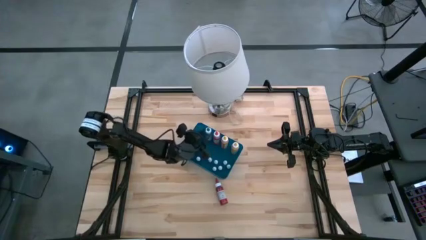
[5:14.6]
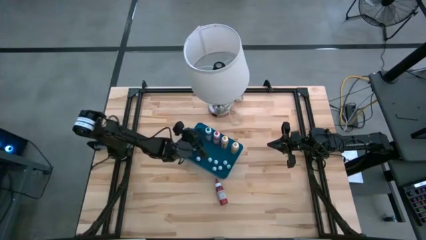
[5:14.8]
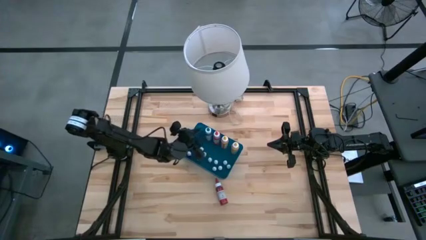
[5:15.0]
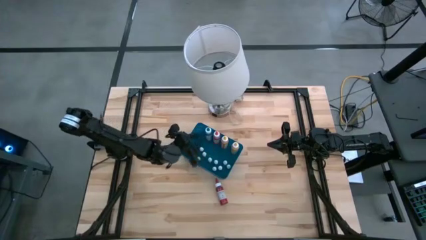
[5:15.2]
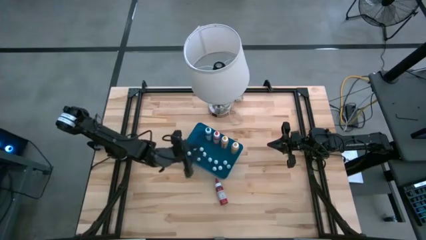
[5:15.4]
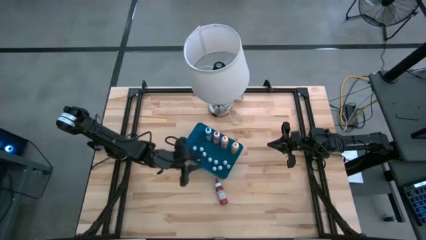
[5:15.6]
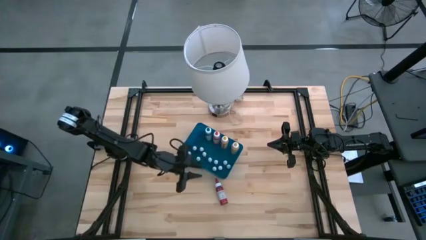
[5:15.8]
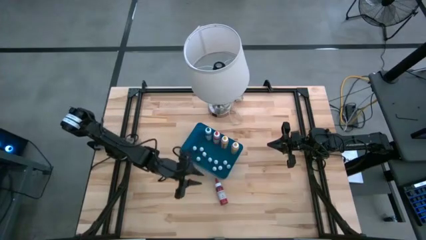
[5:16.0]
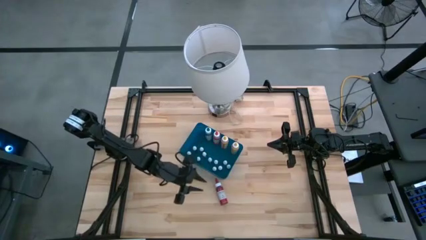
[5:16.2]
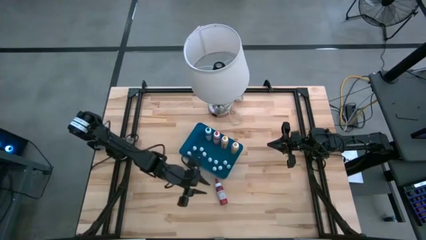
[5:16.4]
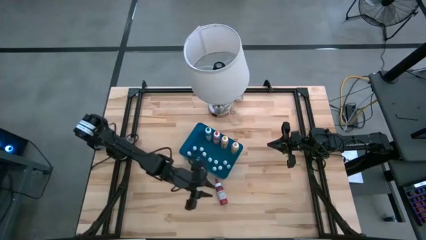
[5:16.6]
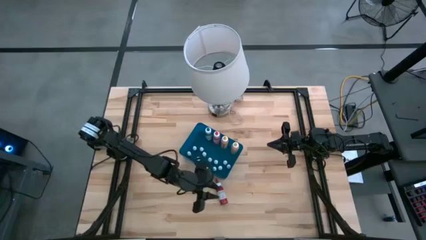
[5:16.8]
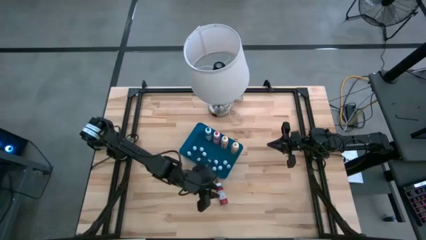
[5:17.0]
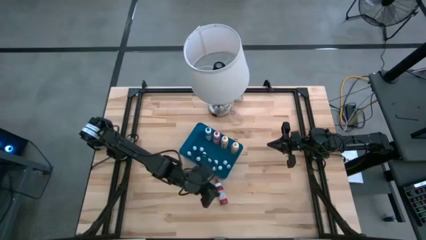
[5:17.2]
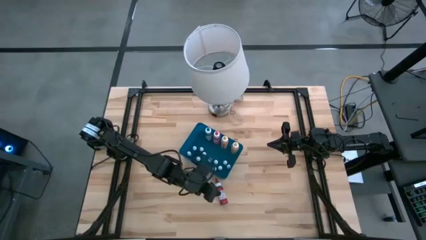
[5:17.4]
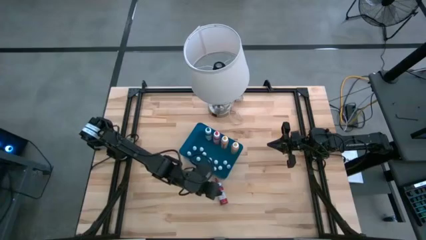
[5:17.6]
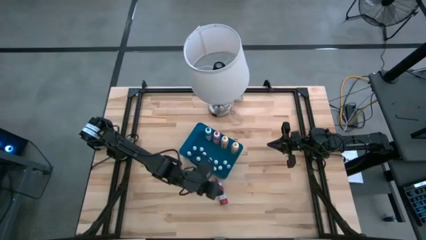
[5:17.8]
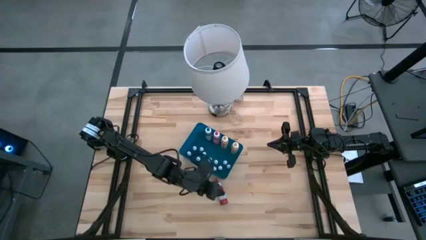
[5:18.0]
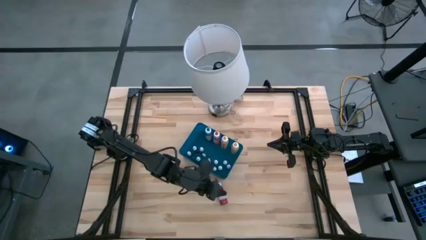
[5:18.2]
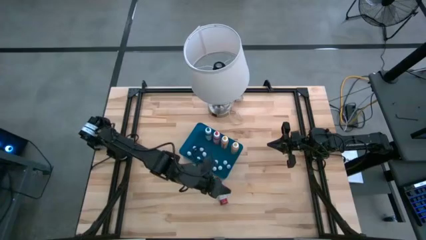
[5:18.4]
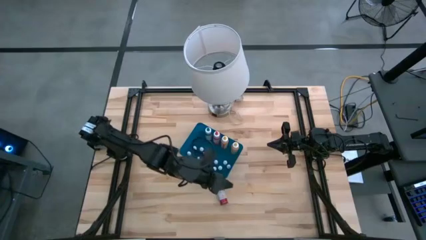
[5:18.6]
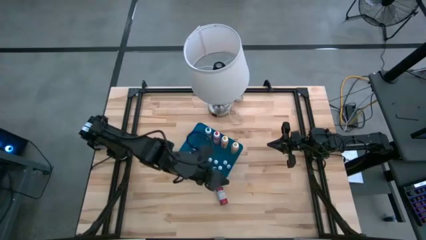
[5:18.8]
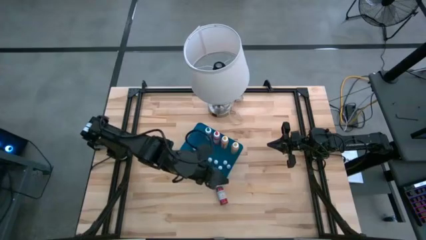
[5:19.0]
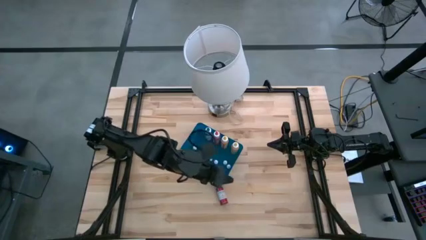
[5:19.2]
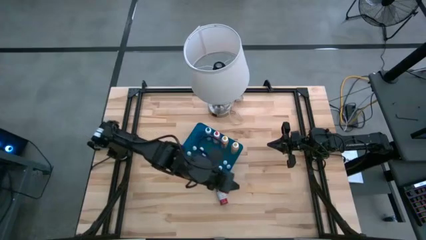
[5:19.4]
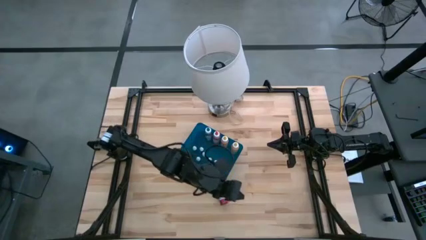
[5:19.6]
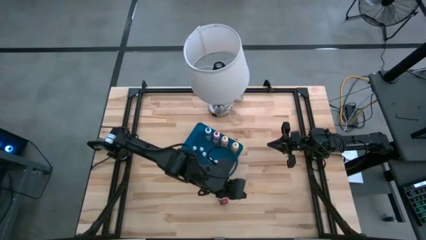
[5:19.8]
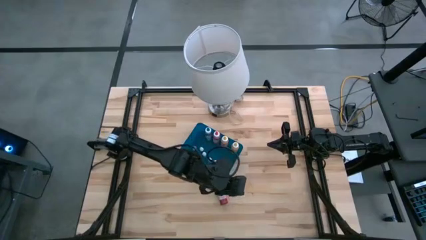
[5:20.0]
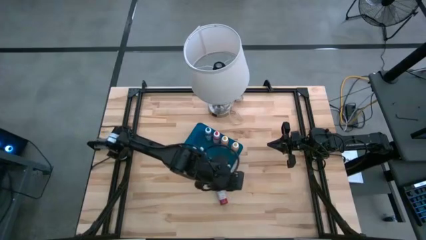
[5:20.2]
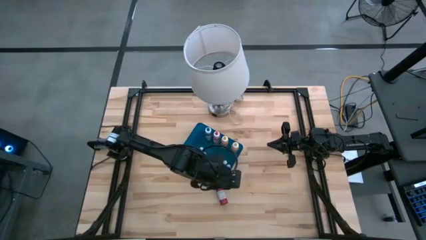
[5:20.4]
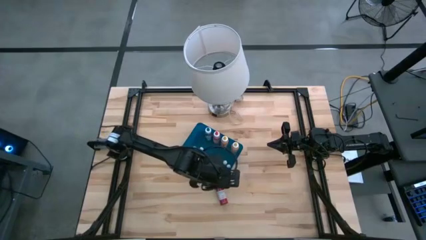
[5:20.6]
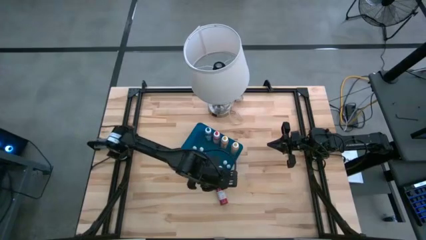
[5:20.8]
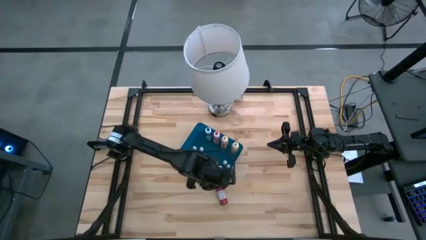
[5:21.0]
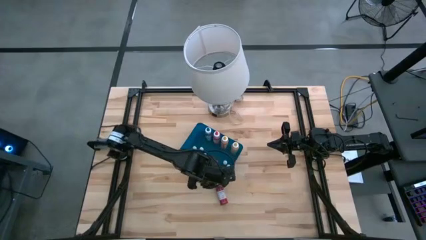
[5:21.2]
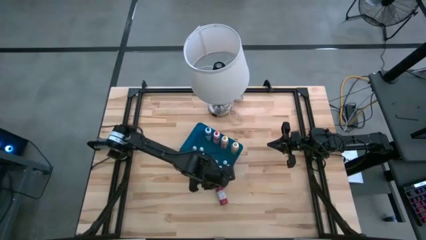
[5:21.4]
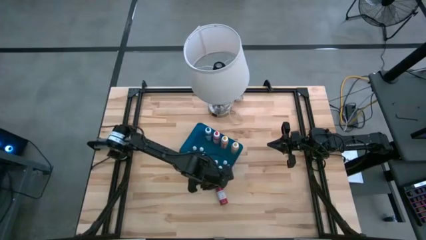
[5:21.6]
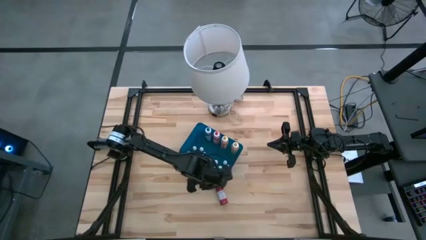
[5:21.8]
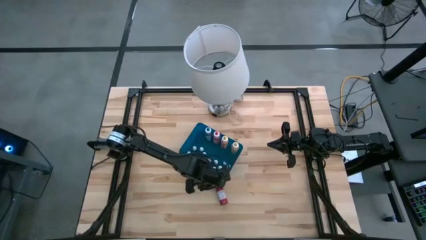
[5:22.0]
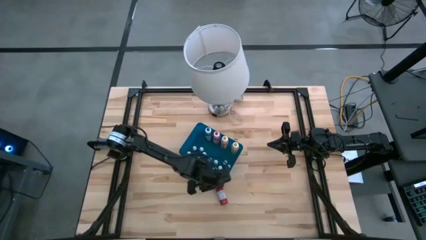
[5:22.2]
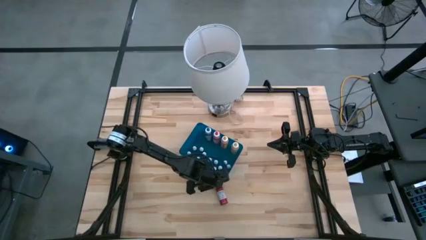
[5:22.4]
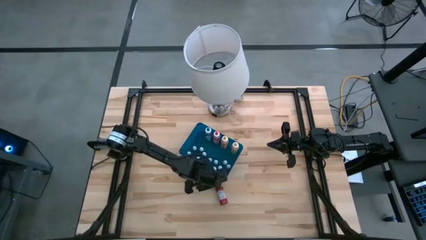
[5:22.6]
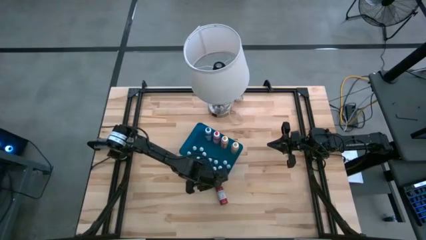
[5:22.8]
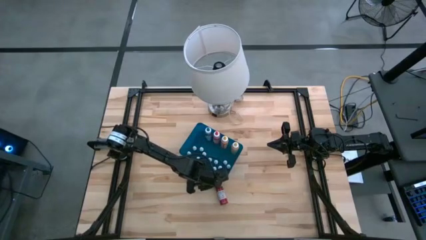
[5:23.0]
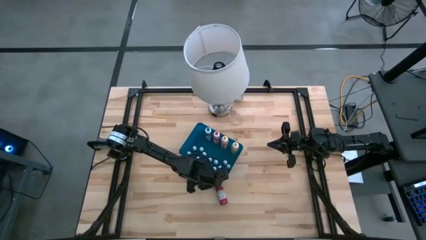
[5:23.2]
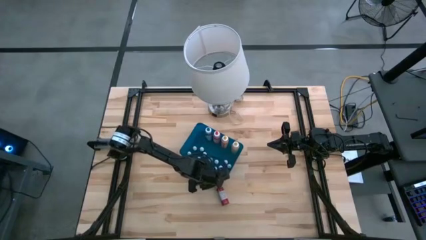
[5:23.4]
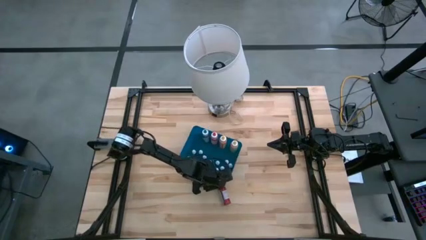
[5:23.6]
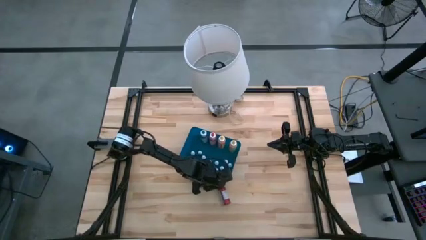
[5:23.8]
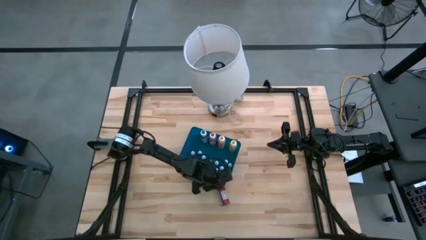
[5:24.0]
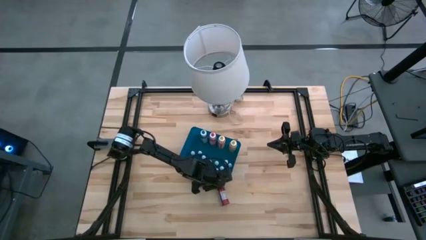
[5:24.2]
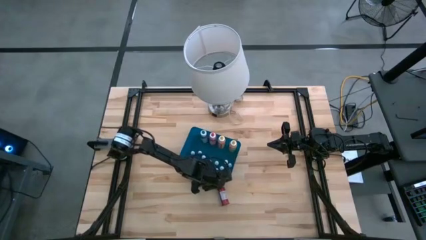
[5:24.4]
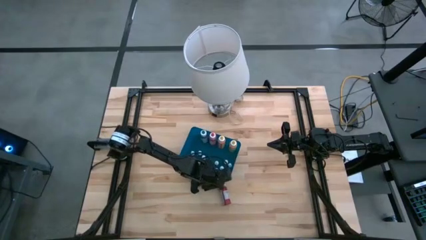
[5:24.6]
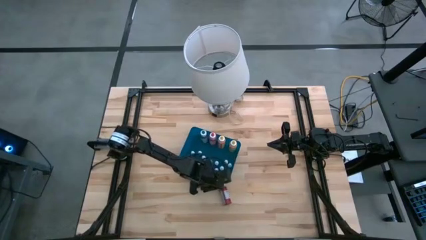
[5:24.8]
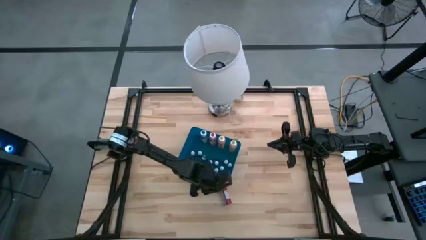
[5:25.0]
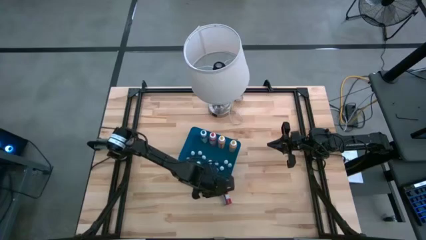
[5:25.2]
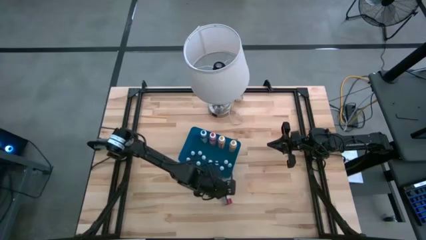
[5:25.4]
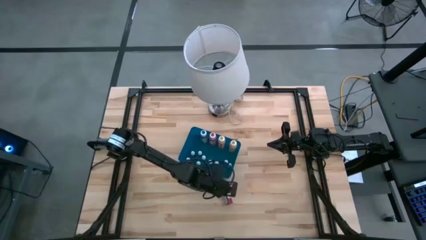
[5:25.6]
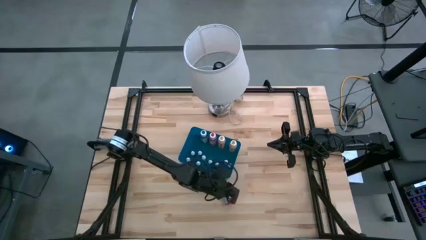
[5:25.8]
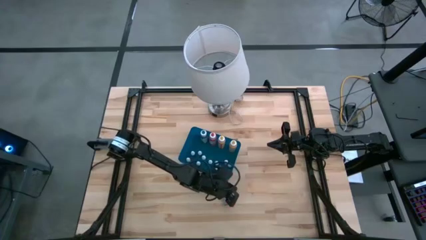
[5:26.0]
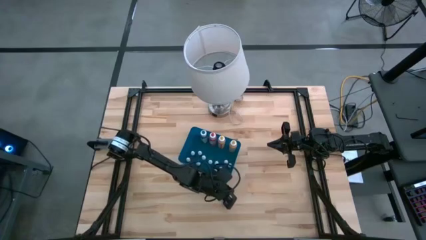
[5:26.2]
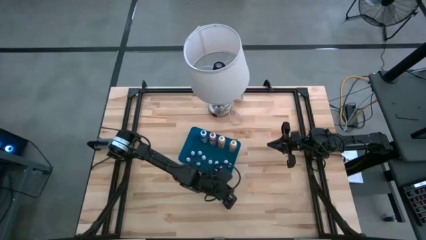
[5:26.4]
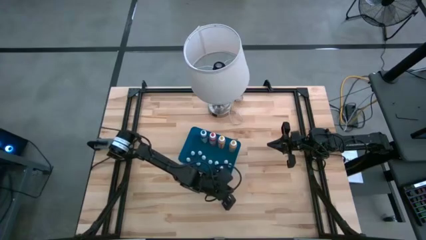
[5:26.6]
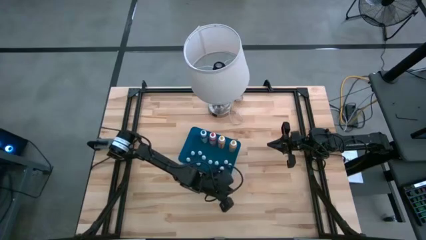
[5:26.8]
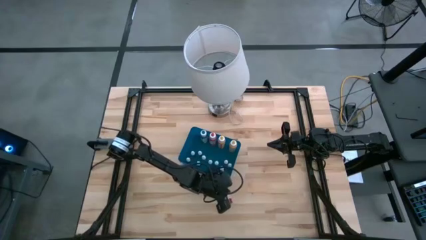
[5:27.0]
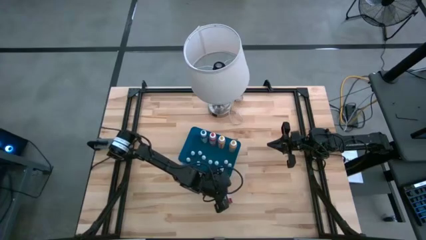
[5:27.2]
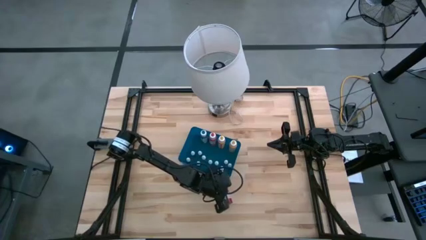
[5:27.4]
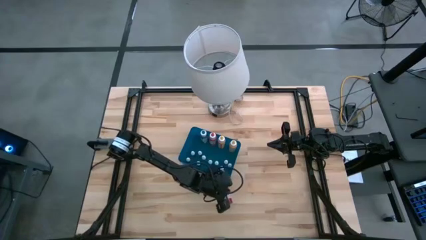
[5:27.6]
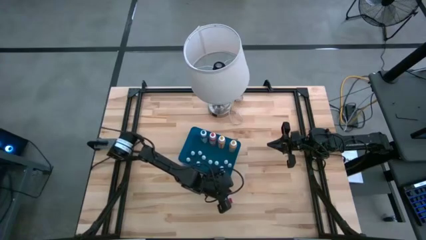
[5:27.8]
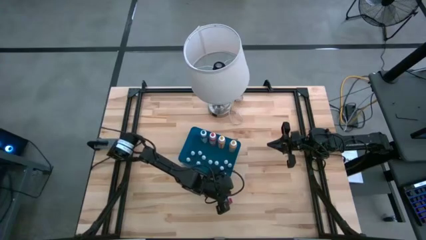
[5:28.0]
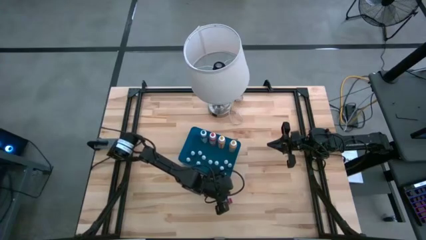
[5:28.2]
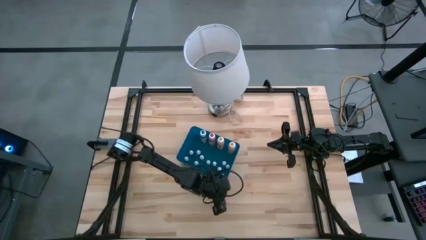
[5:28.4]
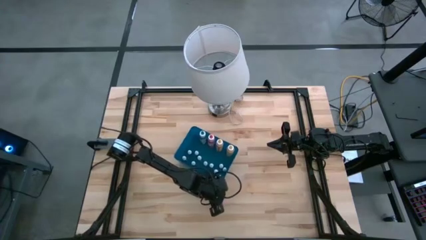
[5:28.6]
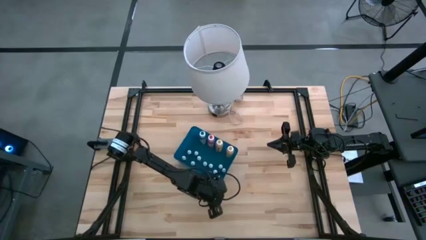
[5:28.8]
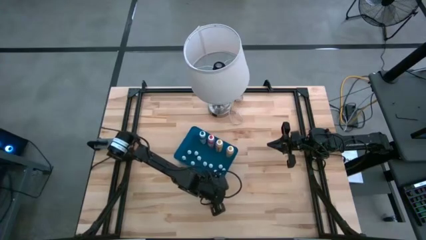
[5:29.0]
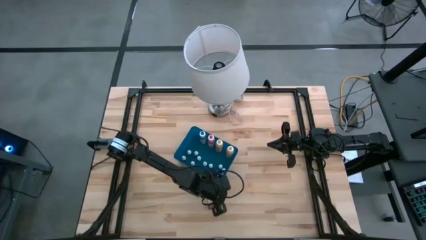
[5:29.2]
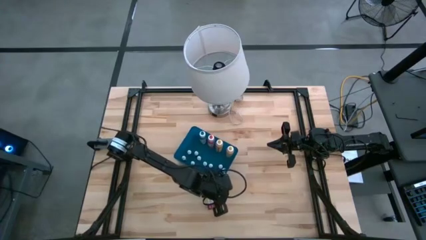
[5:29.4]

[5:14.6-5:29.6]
Task: Pick & Place food coloring
Put the large red food coloring bottle into the blue container
